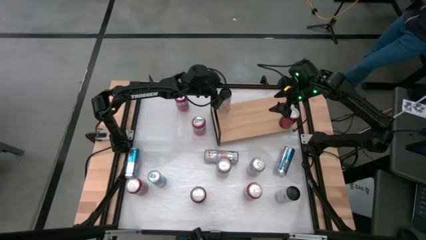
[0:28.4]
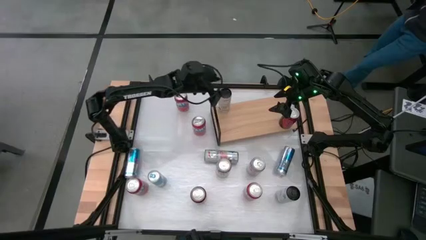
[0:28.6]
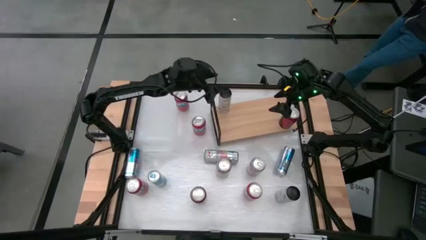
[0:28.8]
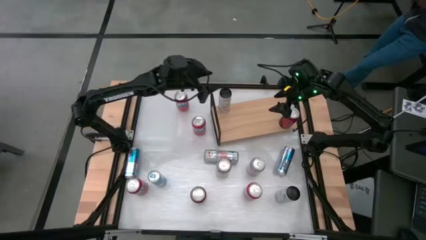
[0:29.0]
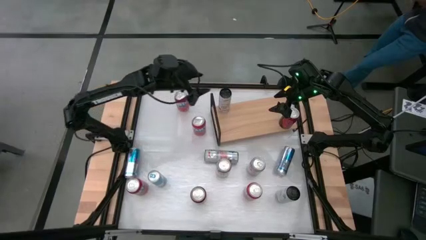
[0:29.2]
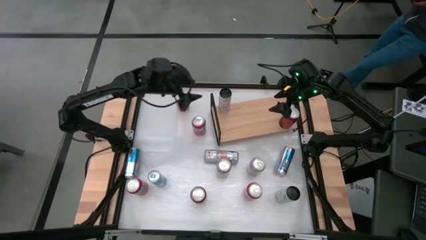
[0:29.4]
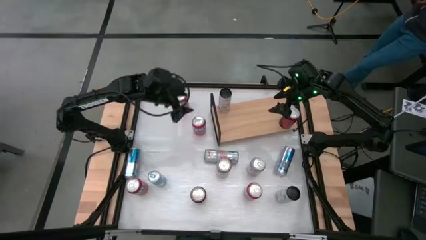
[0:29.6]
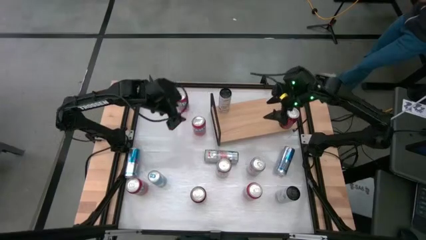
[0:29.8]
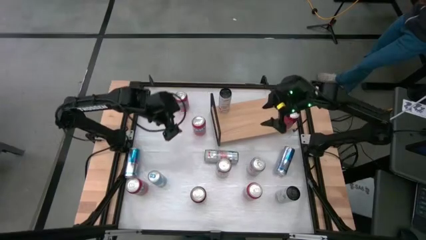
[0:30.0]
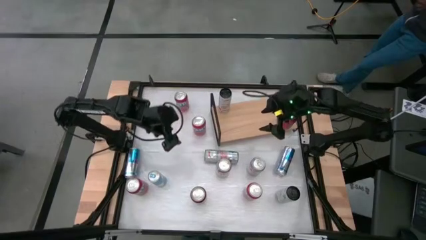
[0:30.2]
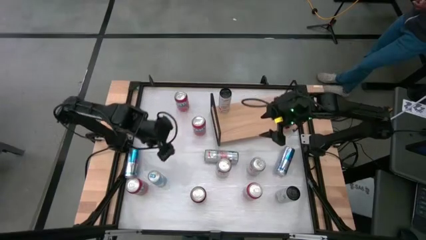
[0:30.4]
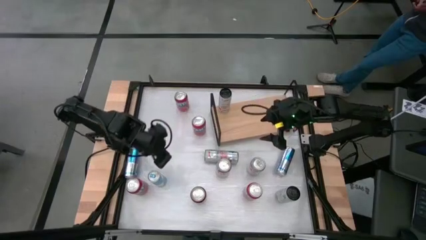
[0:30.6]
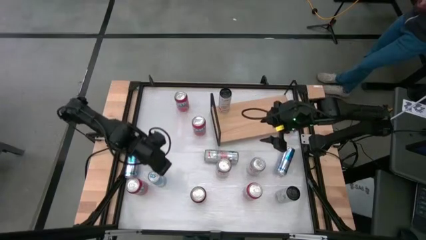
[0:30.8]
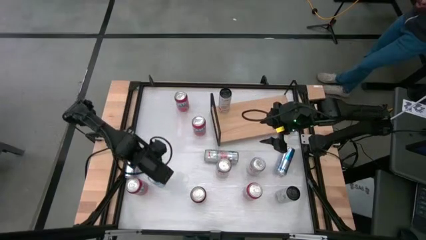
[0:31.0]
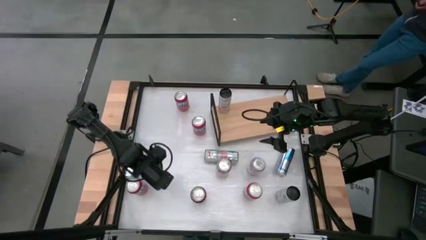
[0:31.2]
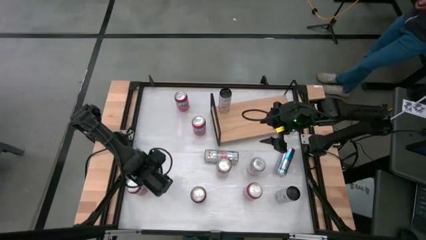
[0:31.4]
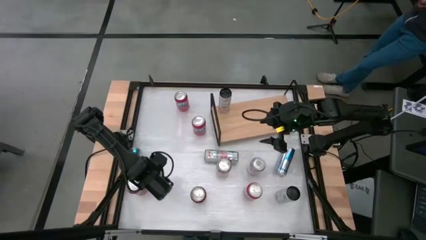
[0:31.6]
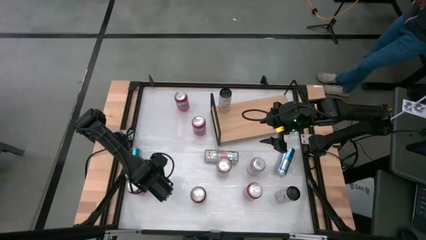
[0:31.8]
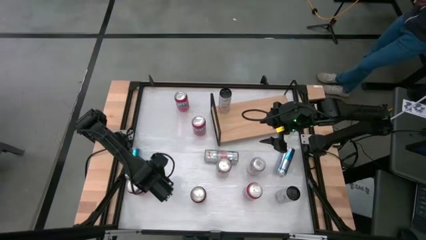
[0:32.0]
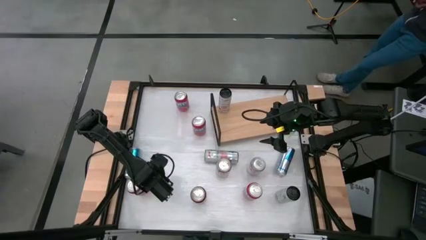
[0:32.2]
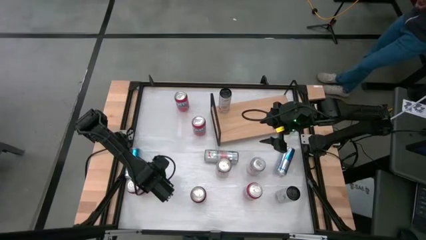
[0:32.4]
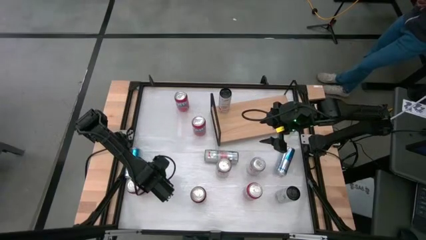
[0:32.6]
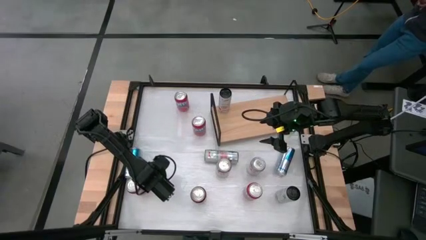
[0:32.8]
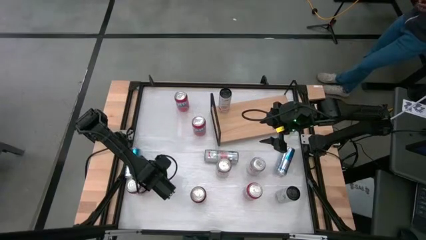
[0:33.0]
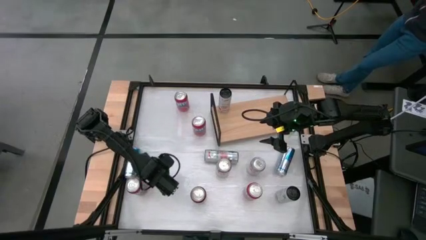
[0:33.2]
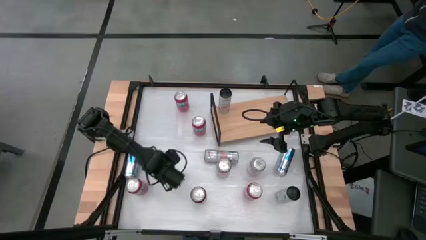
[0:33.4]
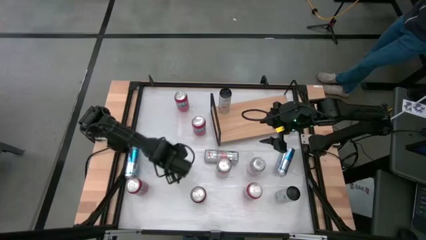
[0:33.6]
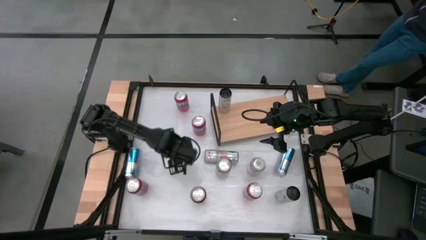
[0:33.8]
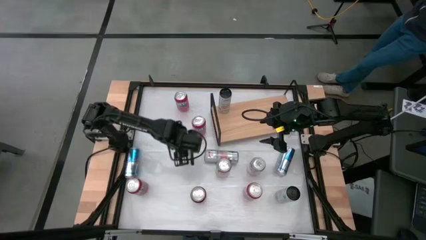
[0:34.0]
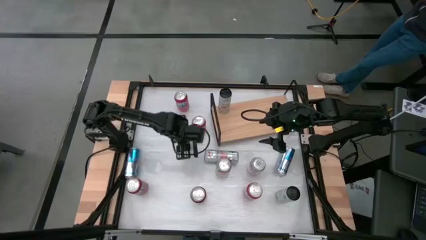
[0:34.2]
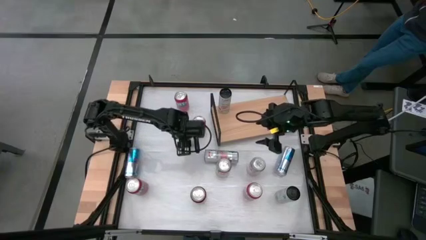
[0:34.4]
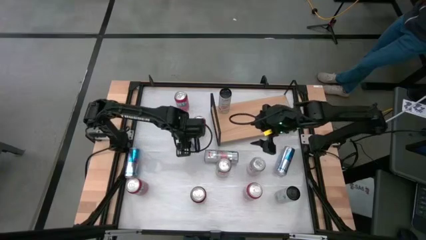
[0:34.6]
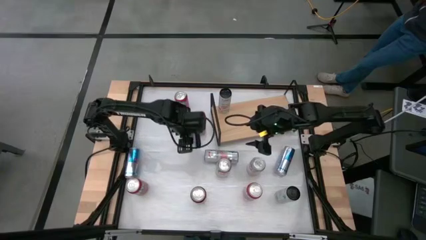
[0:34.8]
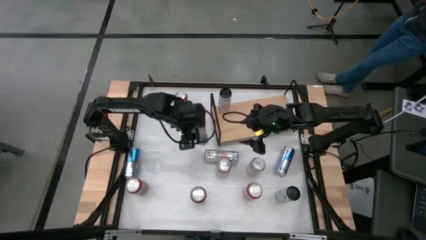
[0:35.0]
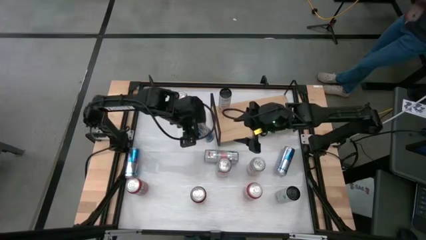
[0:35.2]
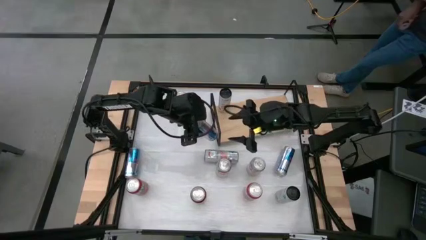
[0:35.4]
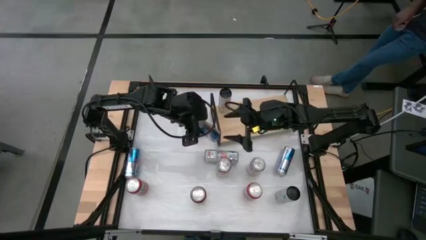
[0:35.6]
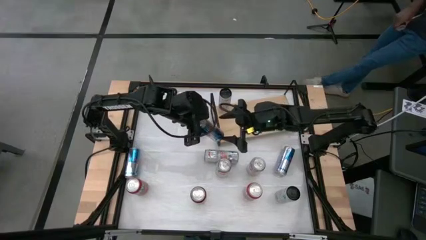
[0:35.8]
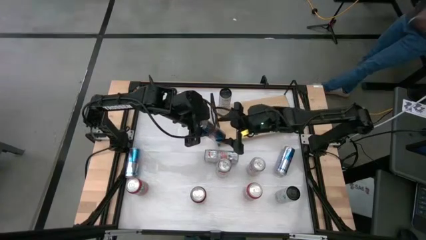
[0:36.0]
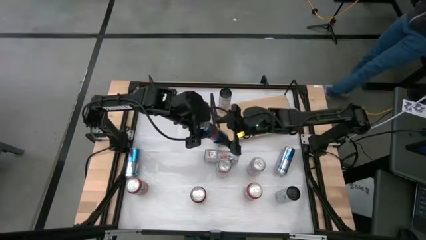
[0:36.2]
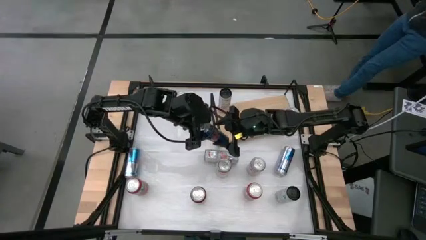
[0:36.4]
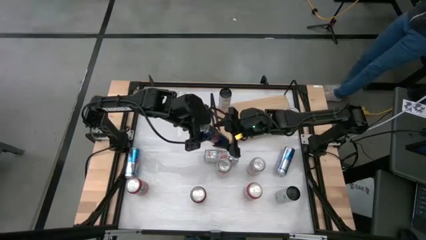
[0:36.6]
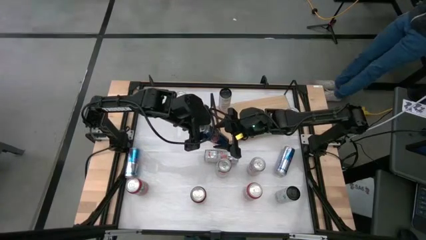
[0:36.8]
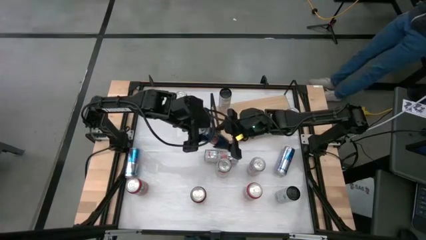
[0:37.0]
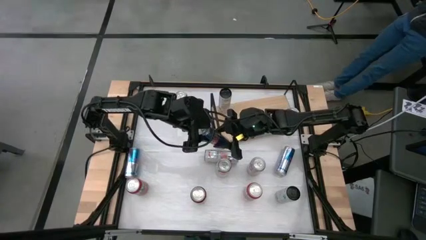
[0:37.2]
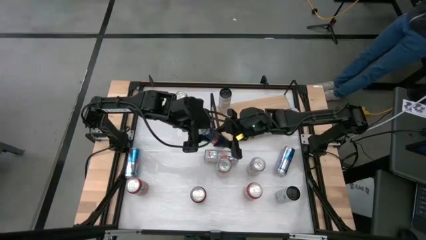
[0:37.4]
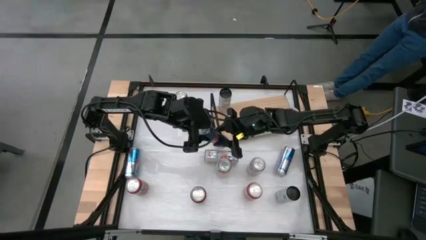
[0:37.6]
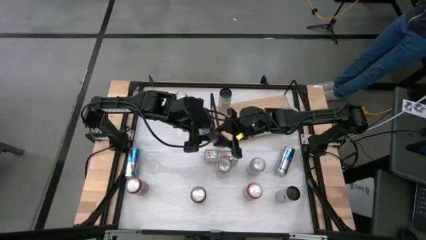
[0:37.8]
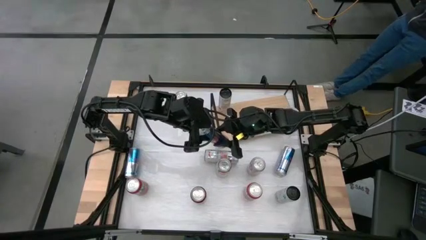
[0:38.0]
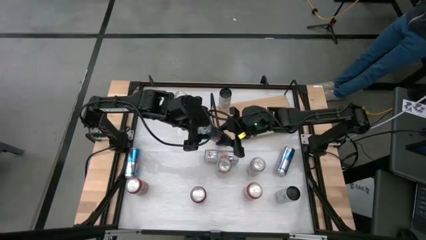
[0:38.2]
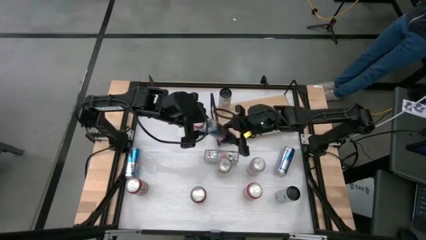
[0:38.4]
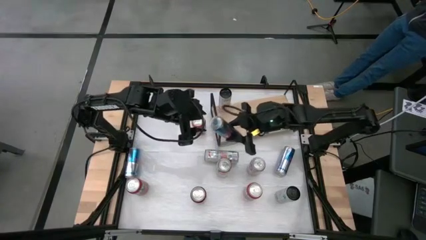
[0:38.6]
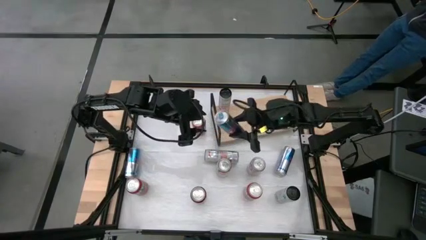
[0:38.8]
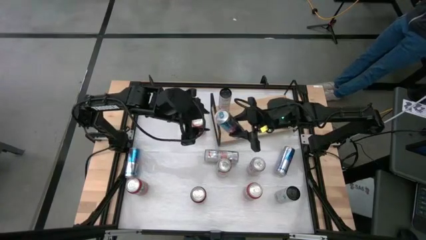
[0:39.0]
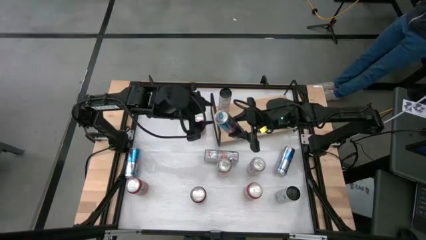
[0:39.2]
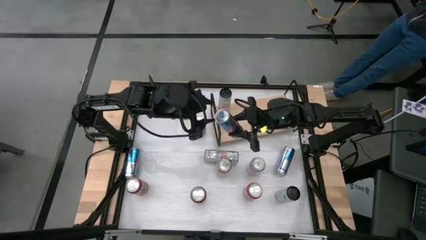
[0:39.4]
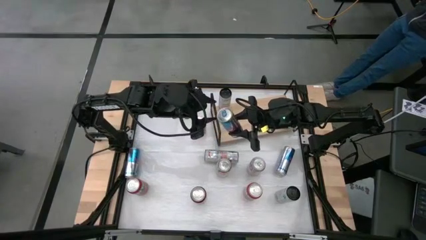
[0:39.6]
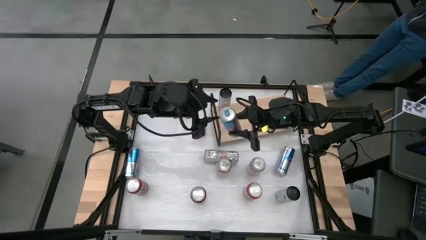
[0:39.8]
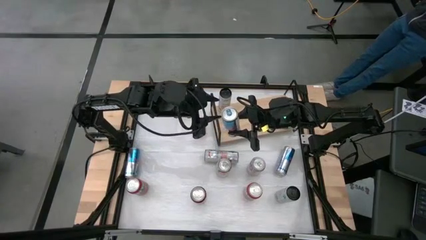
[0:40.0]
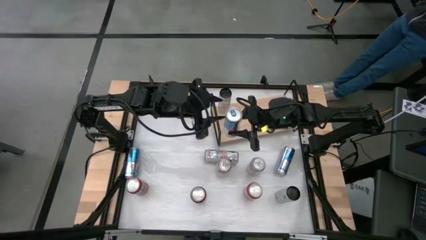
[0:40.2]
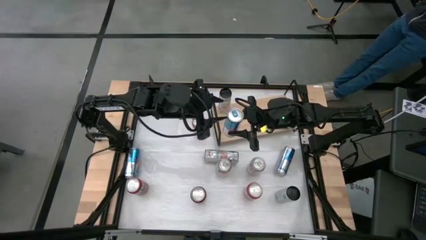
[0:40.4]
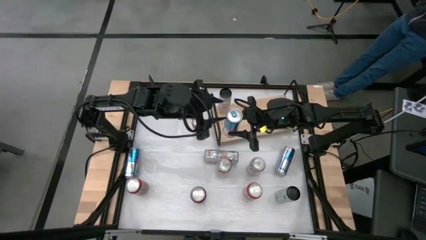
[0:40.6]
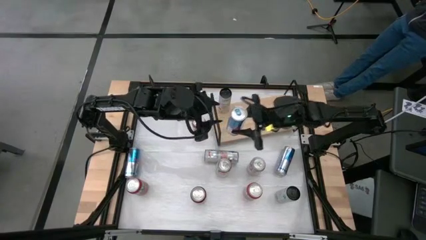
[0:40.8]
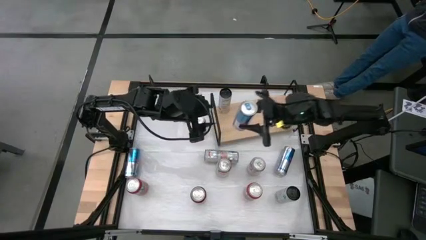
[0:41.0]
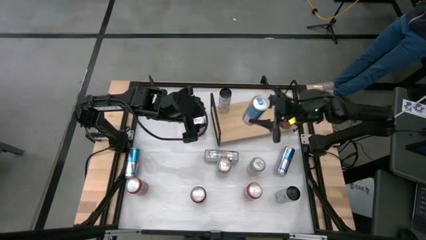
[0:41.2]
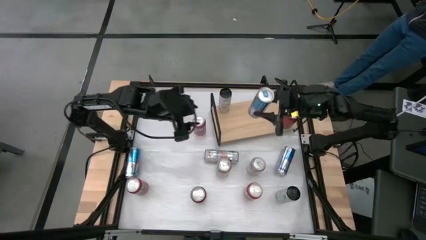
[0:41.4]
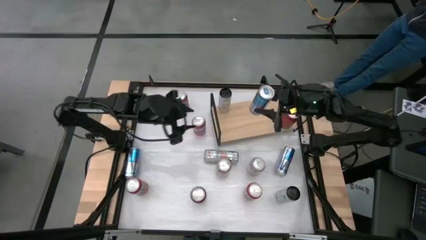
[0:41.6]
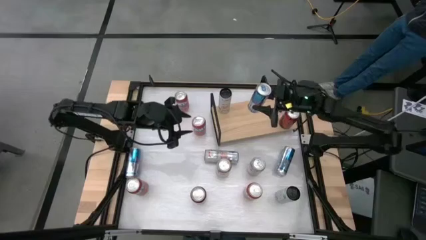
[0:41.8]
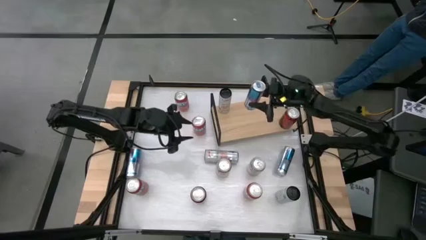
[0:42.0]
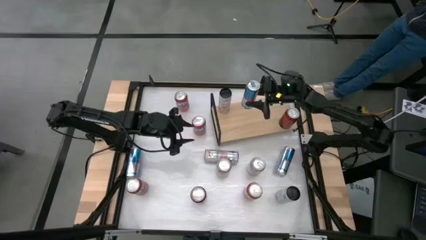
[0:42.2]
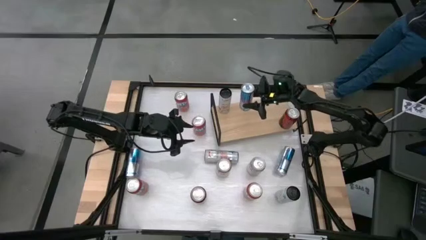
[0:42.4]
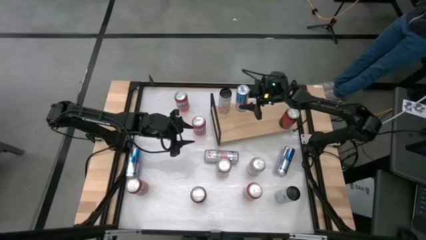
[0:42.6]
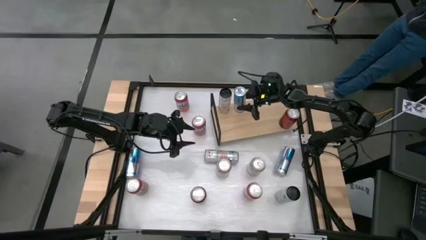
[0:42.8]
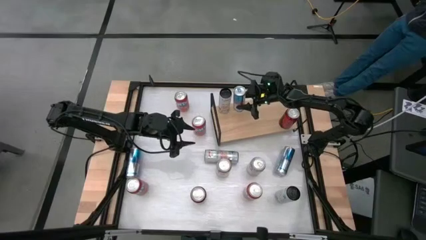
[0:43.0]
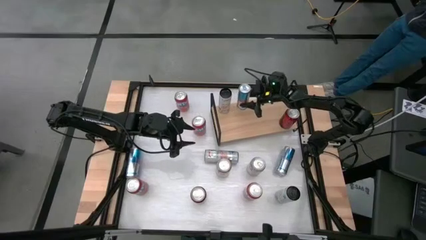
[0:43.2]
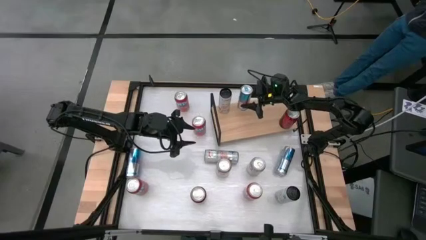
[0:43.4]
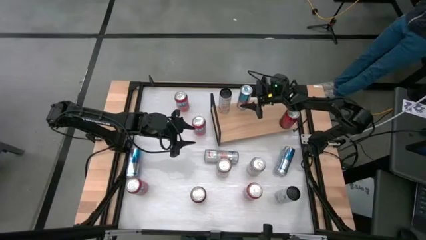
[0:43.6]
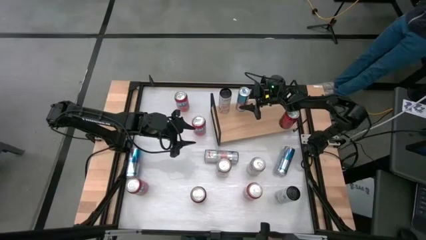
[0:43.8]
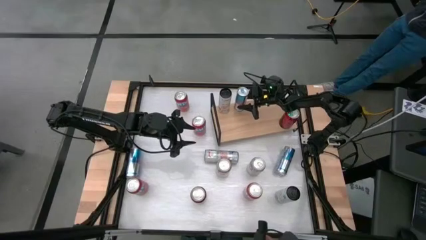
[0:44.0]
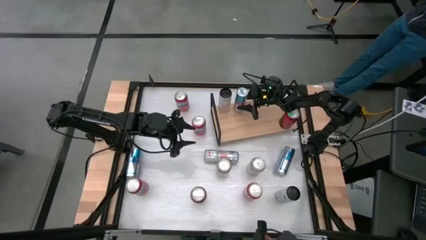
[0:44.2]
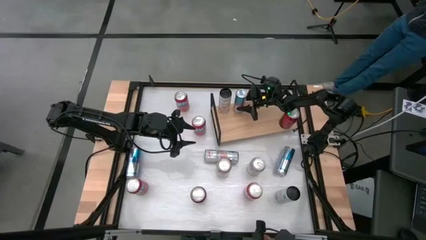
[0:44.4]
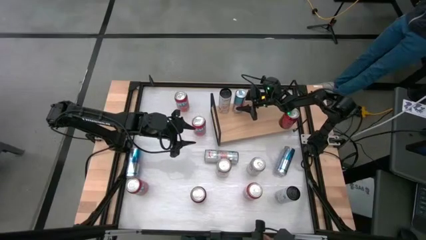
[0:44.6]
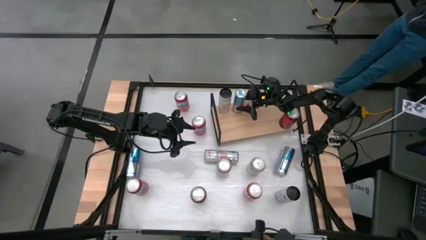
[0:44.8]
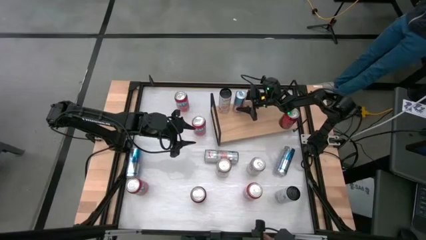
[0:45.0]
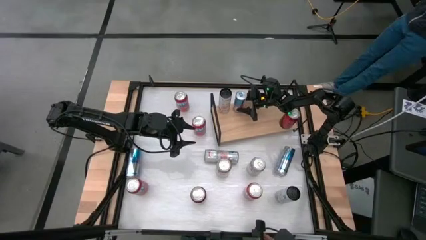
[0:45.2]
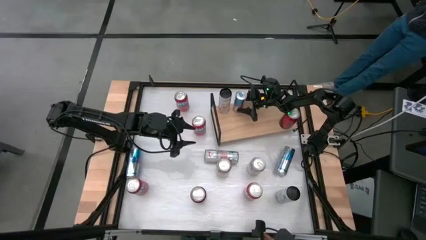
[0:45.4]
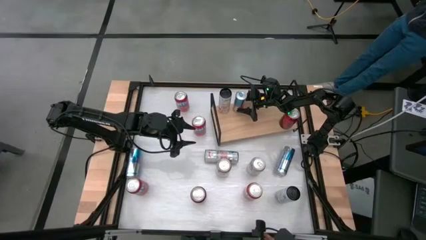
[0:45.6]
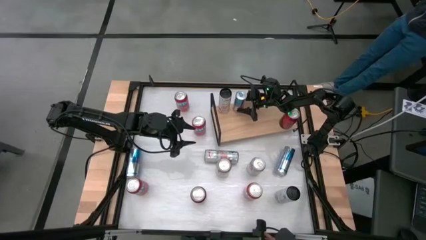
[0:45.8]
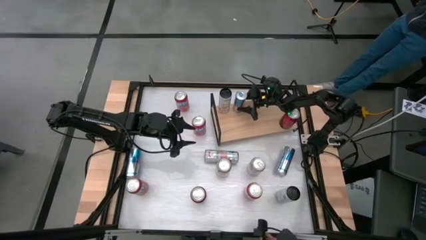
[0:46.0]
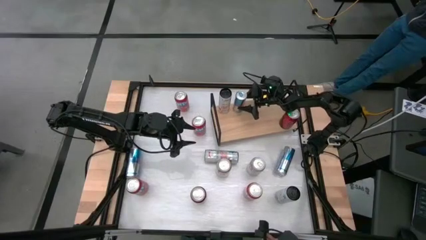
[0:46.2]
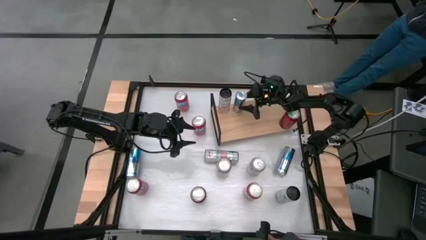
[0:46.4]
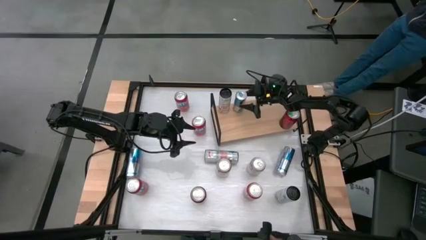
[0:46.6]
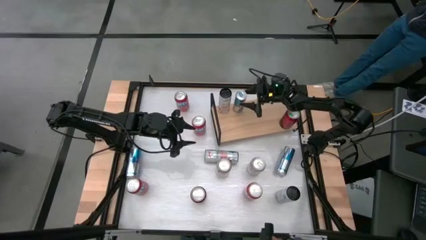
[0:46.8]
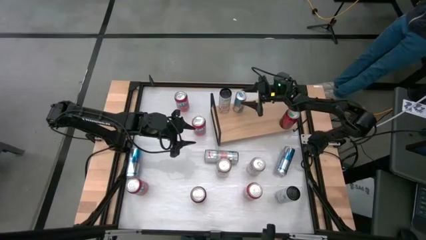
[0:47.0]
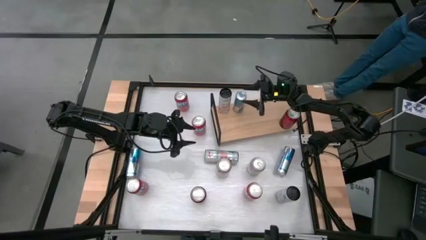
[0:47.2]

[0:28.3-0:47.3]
Task: Place canned beverage on shelf
Put the middle blue white soda can on the shelf
